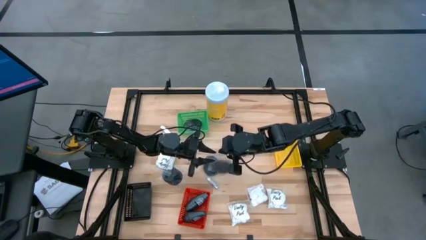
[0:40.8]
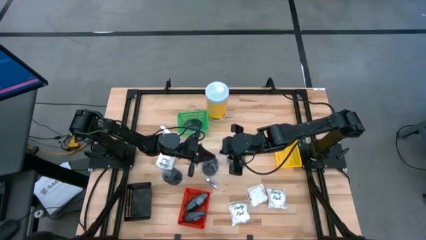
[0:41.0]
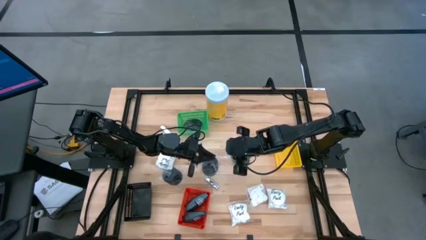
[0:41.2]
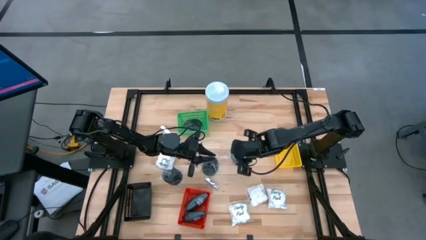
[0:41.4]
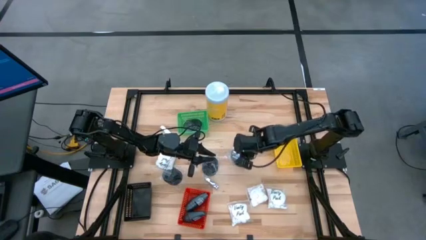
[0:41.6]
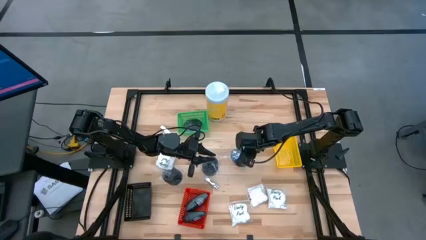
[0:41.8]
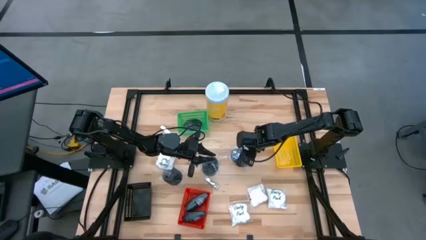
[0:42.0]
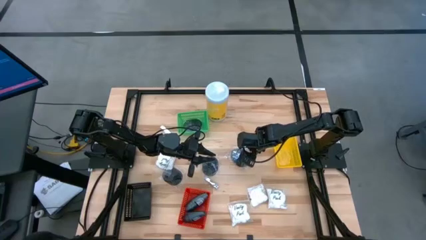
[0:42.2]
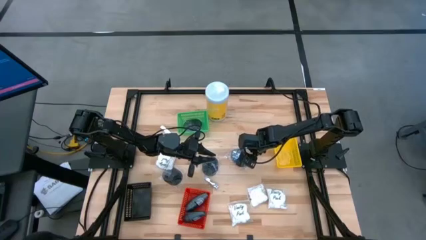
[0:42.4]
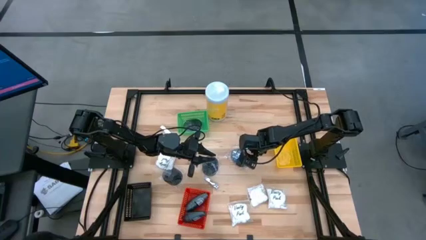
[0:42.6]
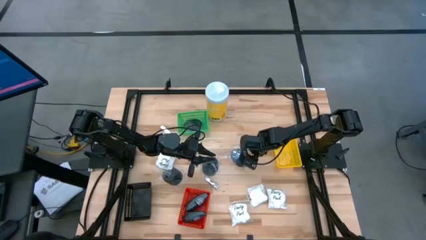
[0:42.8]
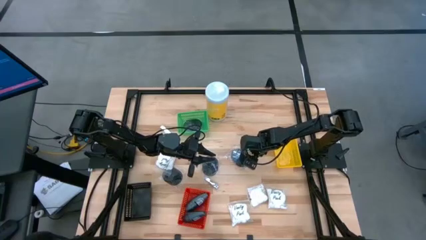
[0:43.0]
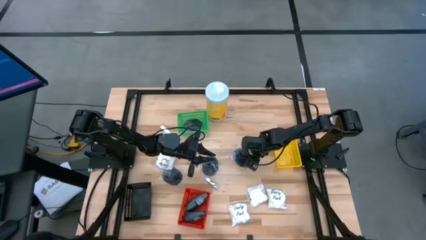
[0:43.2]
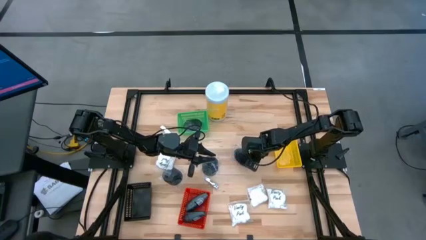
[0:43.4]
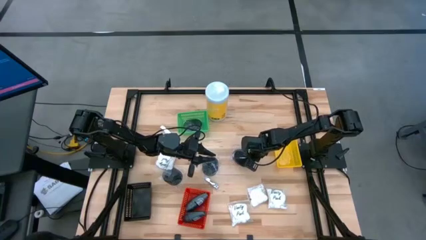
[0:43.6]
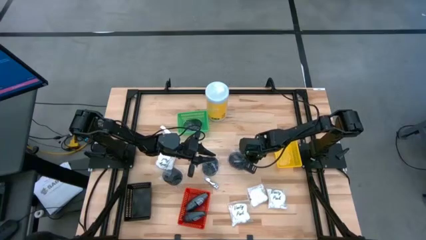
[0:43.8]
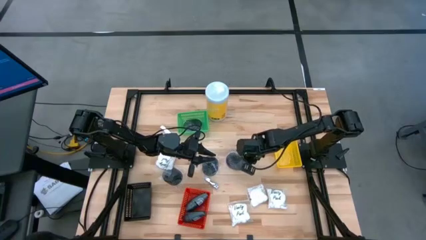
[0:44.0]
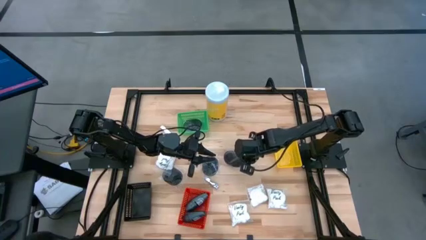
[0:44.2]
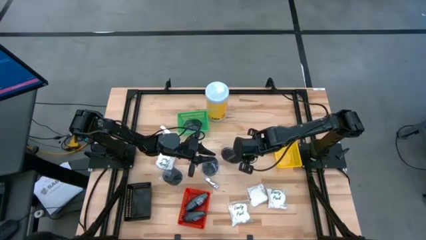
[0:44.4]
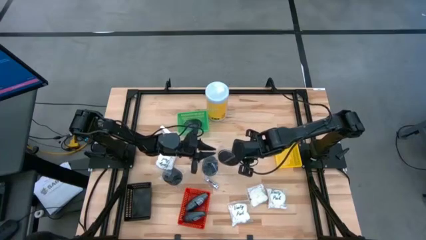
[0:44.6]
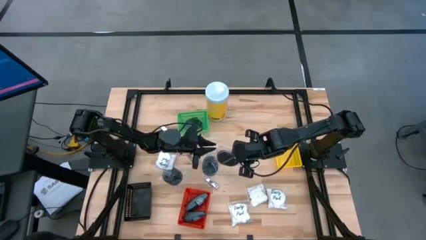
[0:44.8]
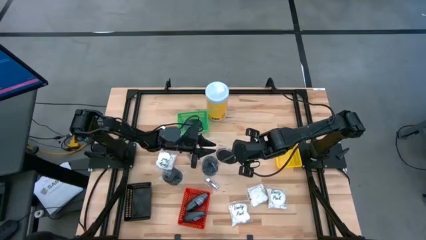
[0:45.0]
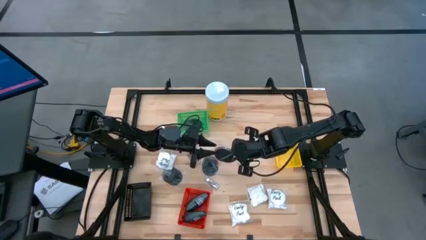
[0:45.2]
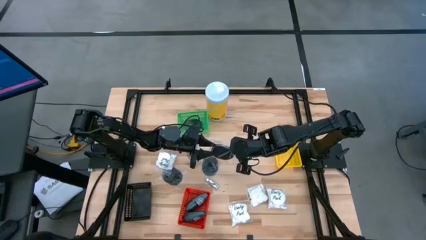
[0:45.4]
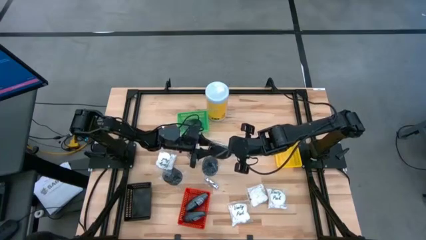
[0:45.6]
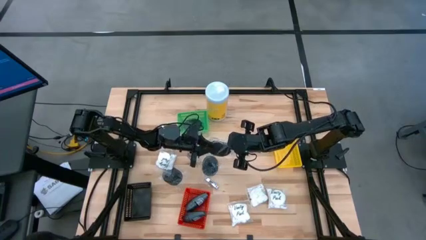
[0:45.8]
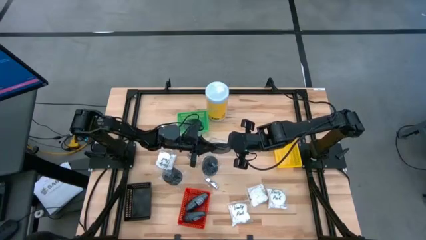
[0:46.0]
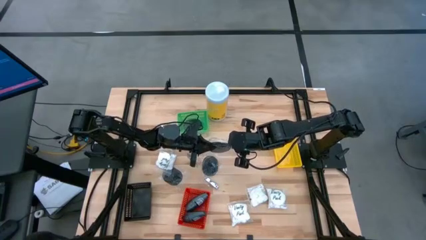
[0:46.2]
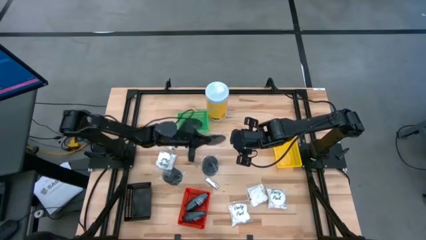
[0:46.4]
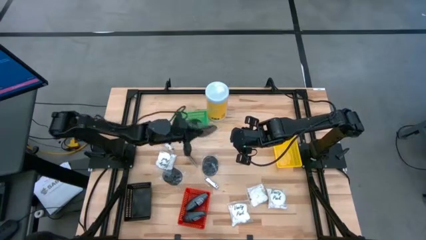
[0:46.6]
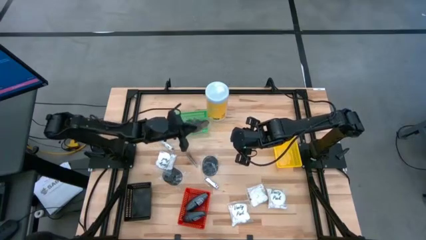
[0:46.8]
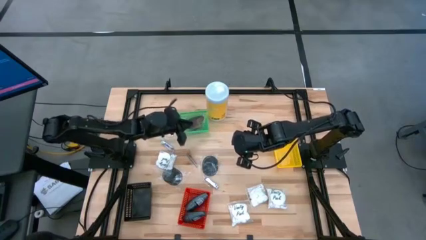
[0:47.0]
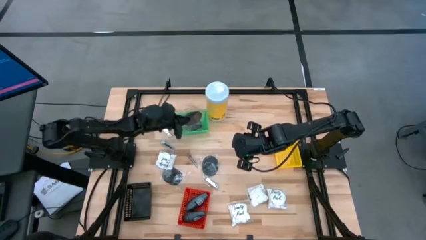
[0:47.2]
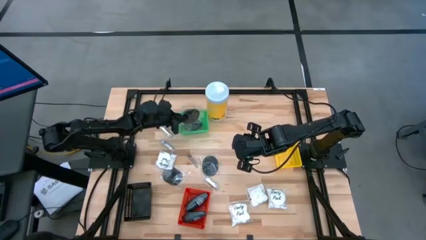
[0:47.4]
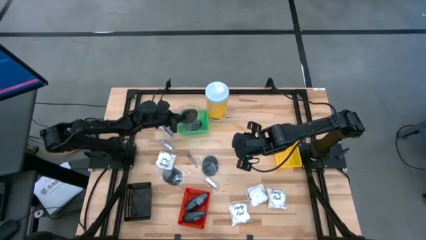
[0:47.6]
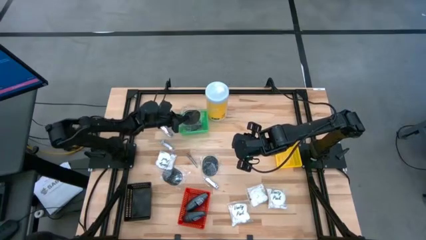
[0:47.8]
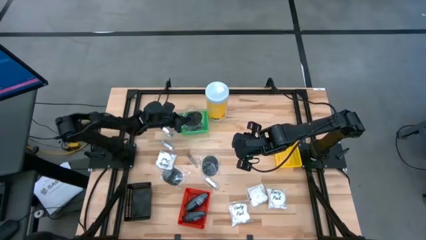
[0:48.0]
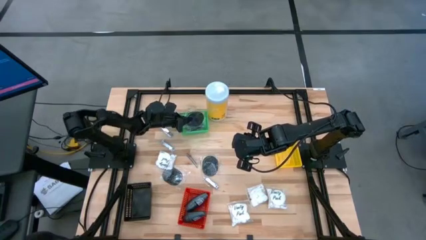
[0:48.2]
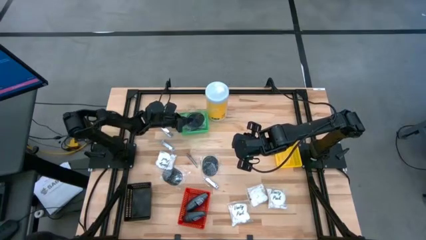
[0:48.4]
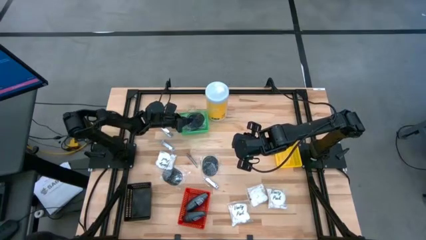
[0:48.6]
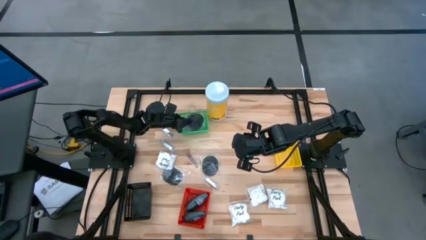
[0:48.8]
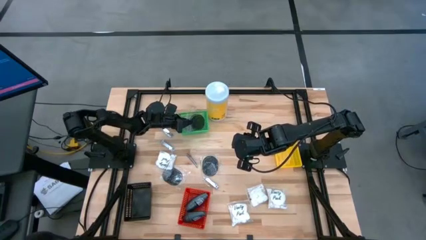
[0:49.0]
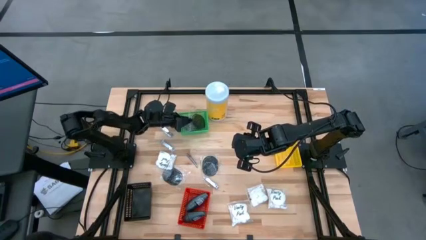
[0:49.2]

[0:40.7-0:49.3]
Task: Pick & Place Travel size toiletries
Put the black hairbrush into the green bin

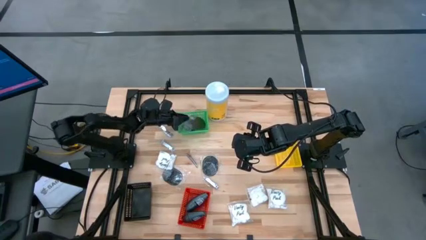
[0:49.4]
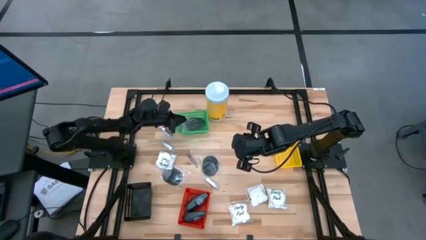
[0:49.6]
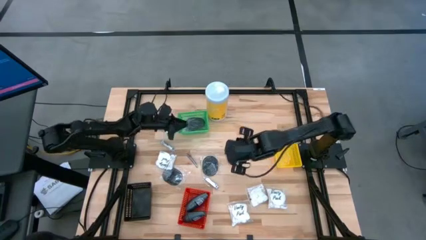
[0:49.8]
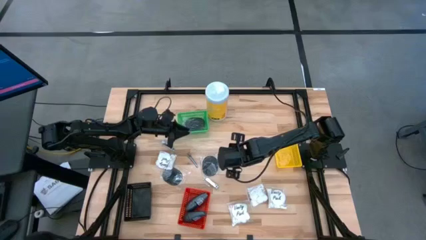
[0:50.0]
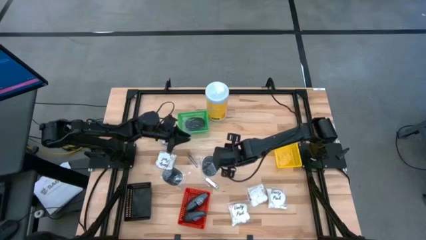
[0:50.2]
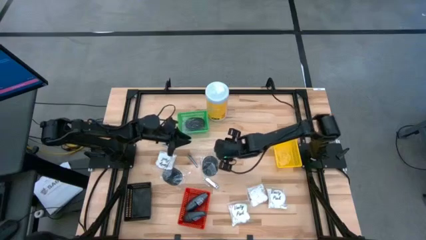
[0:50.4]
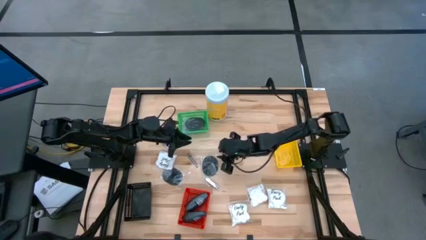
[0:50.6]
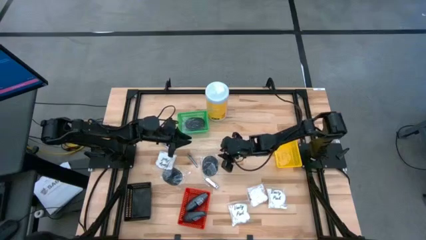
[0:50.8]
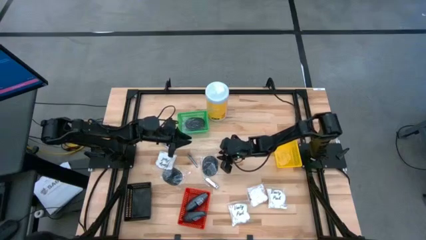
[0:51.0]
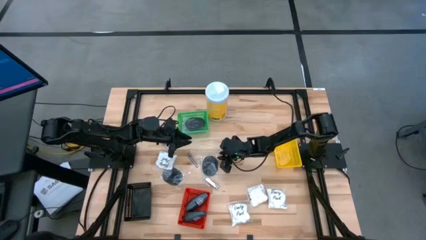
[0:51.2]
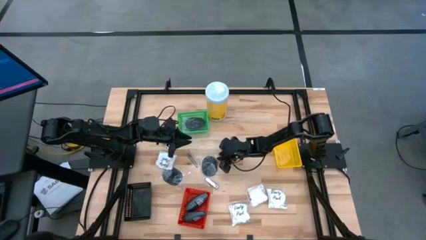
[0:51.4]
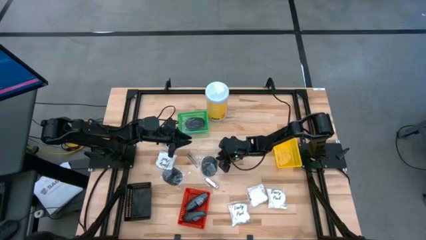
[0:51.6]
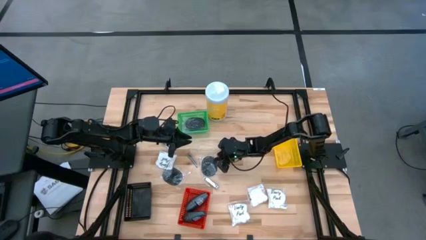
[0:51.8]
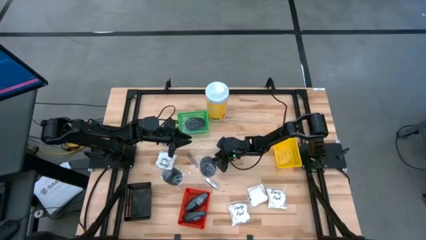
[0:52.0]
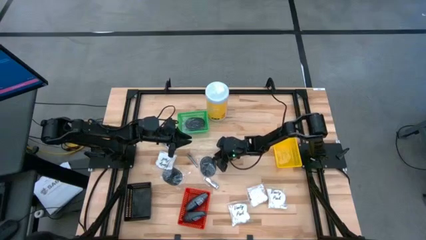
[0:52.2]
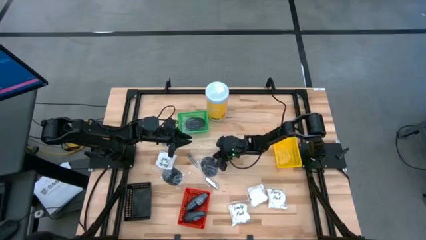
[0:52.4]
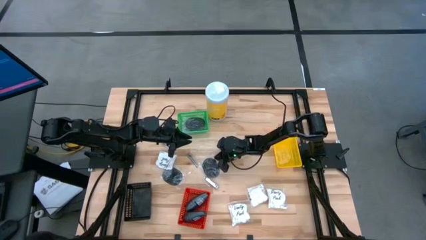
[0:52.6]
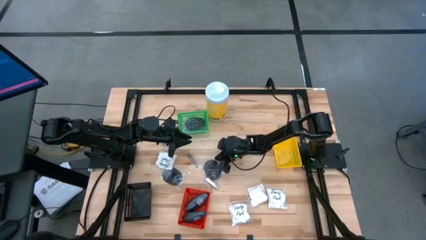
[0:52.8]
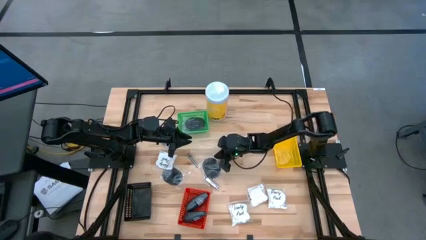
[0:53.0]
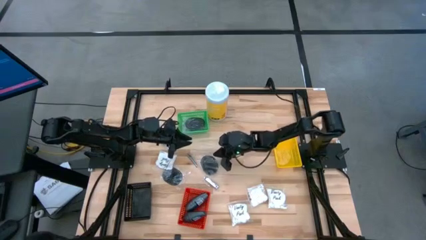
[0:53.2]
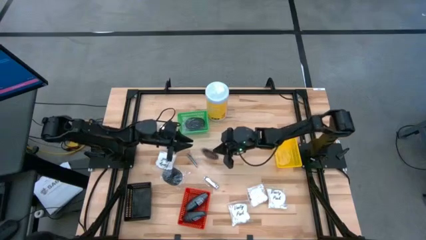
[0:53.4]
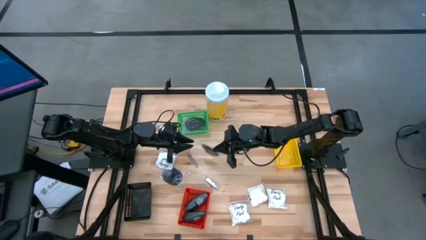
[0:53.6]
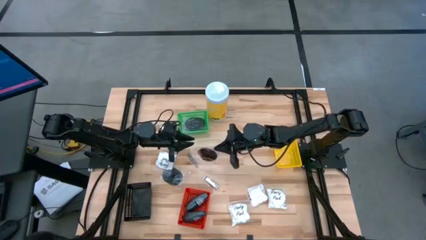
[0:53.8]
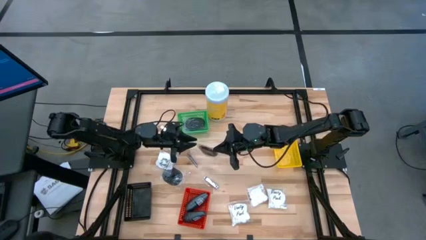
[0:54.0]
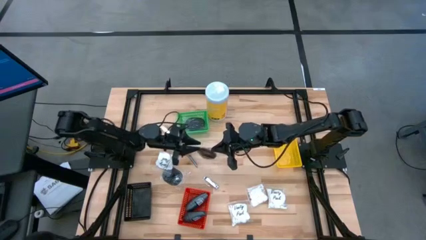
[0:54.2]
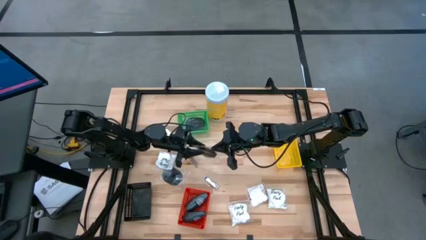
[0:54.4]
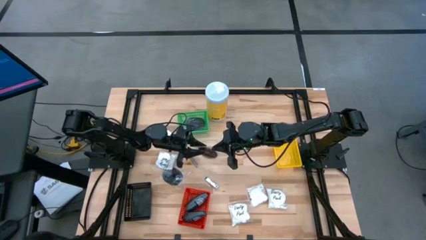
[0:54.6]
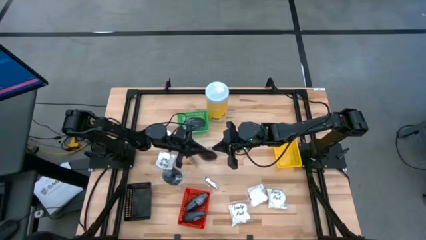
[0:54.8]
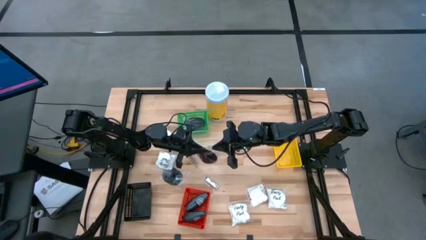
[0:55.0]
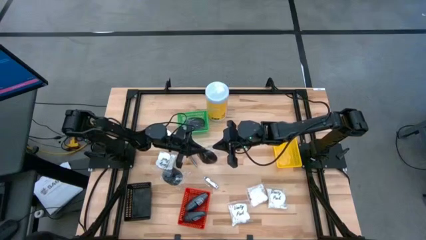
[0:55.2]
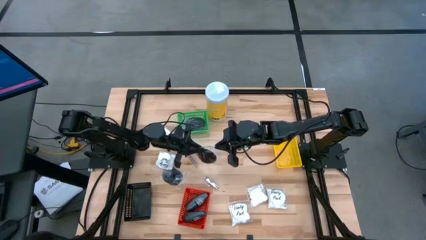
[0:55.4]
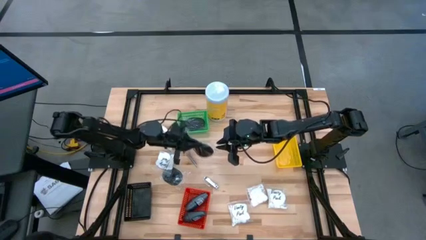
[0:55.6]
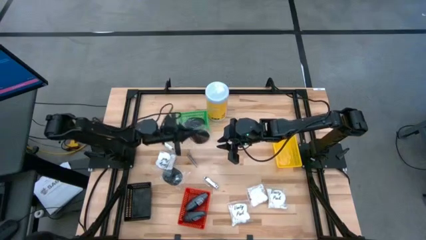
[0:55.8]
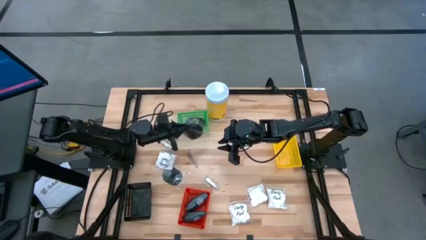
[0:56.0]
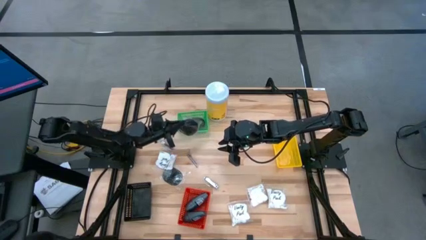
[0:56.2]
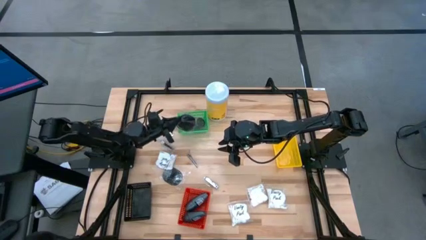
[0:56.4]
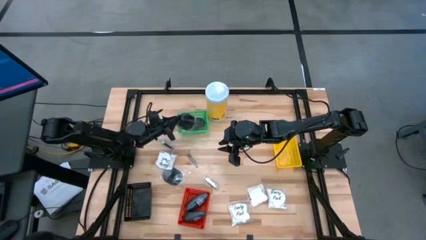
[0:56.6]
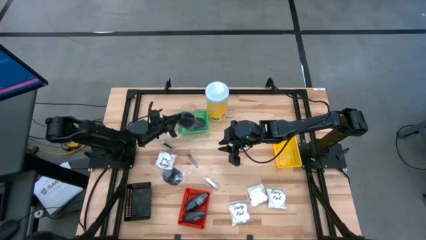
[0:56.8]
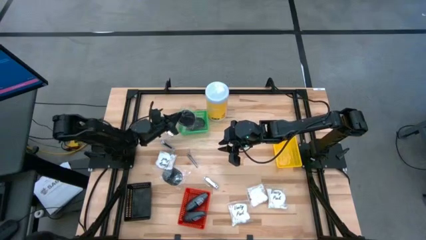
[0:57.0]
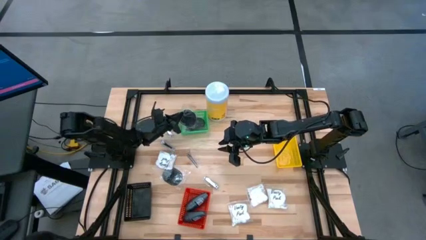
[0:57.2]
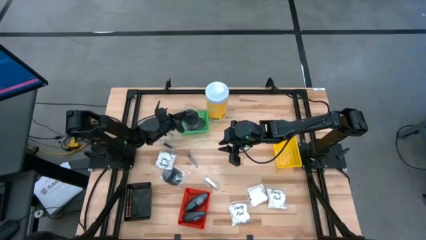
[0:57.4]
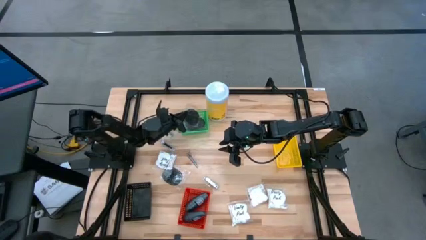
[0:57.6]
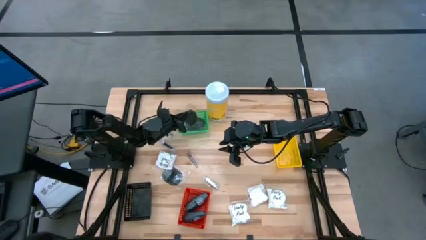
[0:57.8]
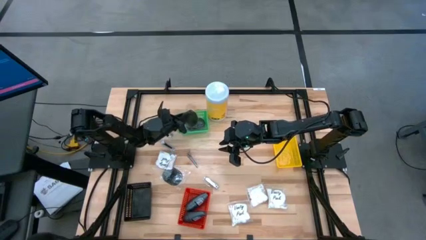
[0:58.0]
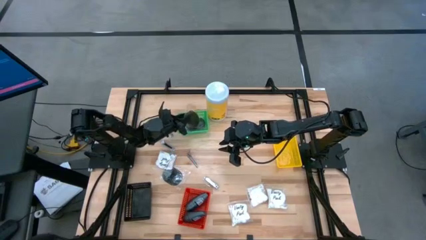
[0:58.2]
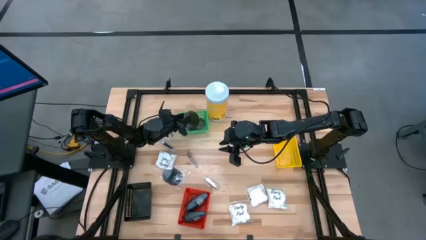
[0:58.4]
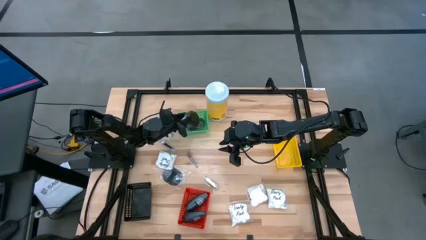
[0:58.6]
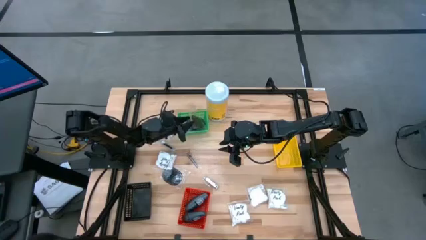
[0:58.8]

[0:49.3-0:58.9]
Put the black hairbrush into the green bin
